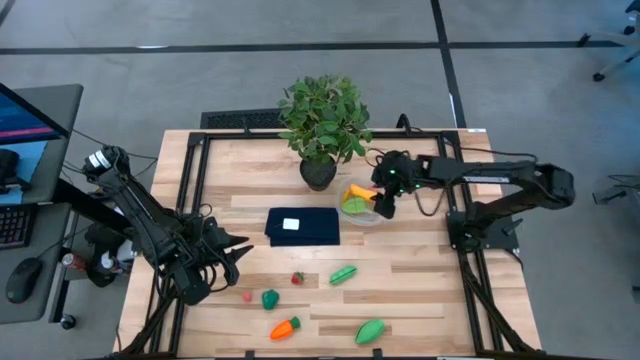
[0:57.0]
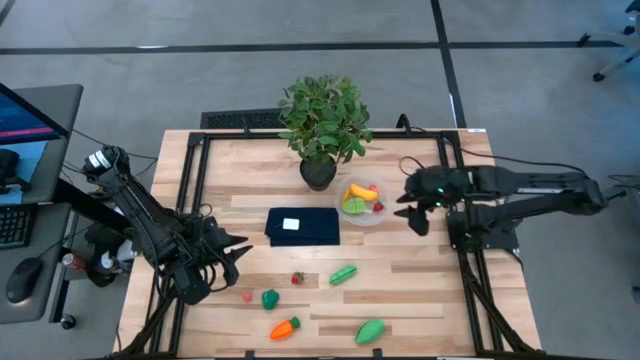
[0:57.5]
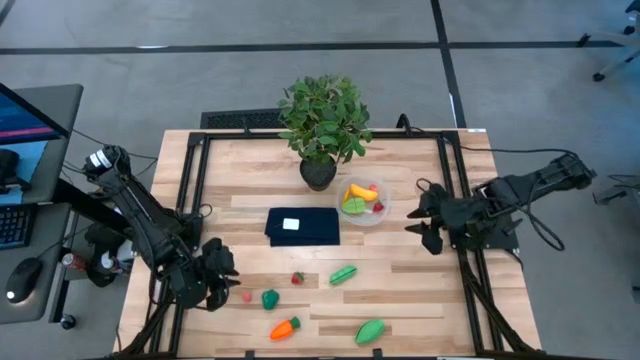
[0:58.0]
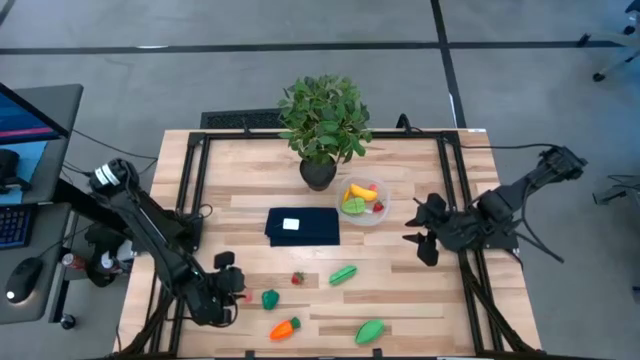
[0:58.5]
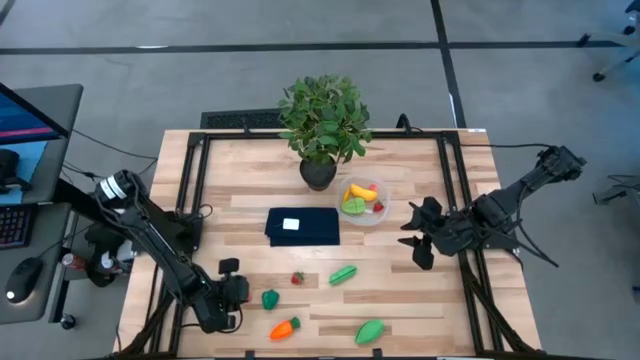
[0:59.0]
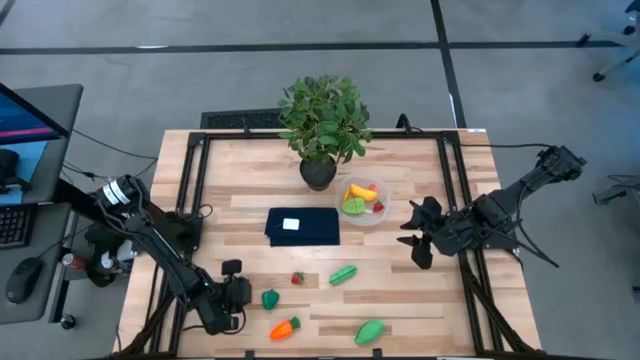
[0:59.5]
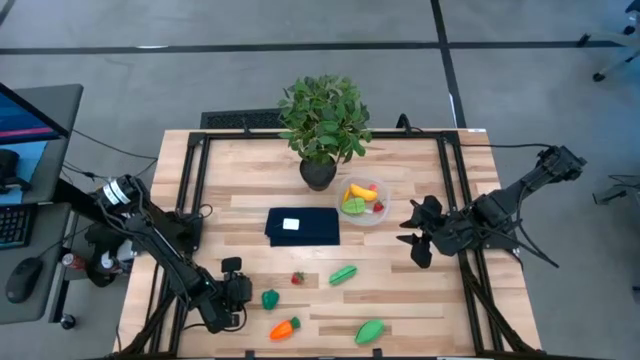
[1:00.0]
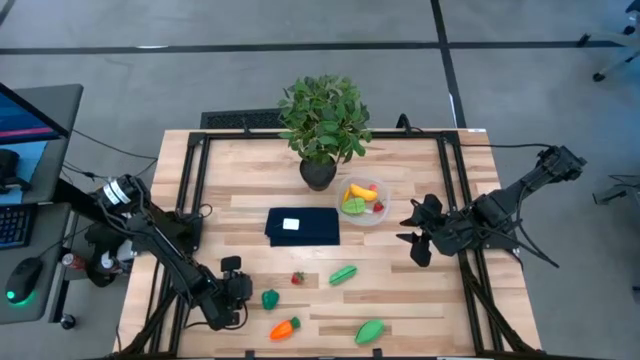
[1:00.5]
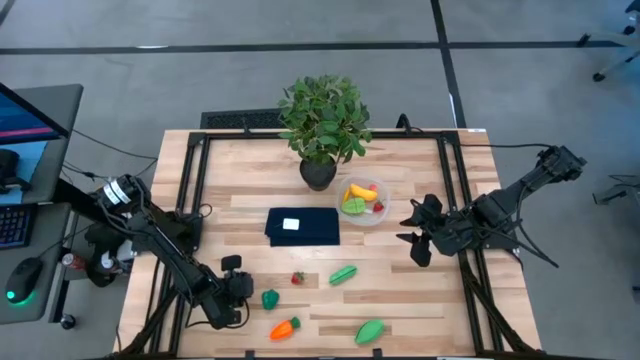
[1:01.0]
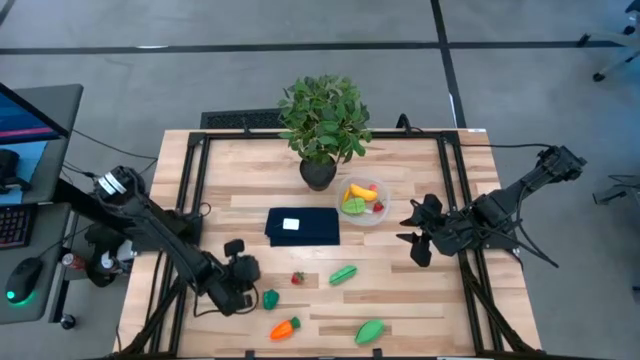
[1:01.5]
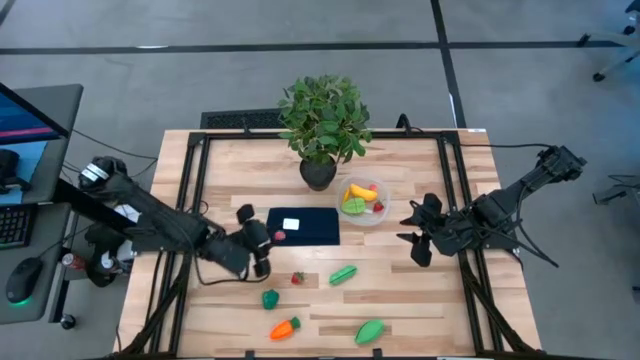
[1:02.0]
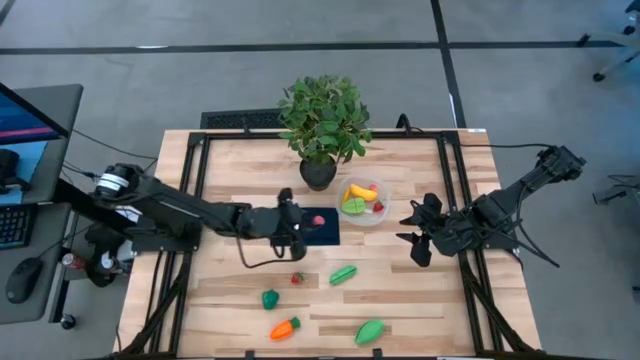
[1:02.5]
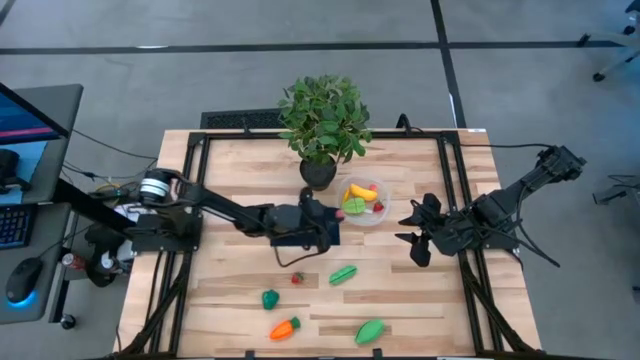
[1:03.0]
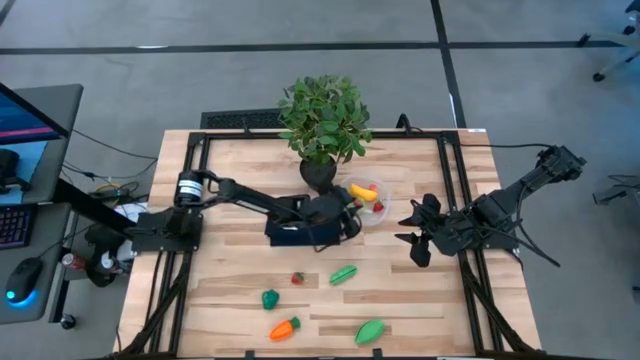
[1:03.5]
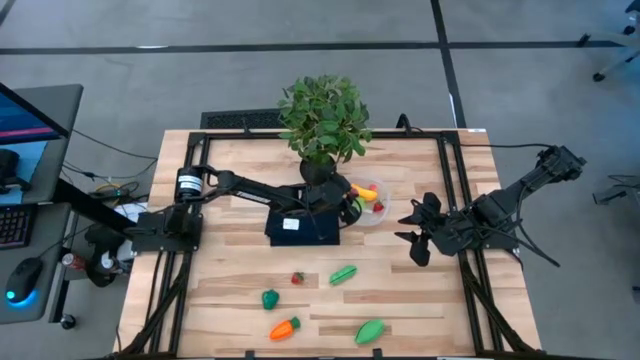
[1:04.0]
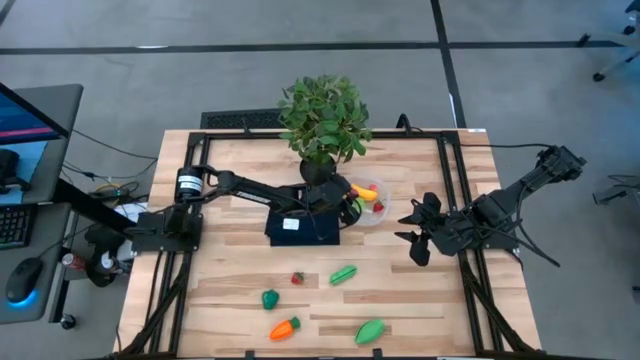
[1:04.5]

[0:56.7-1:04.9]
Task: Pick and placing Produce into tupperware
Put the pink peach into the transparent container

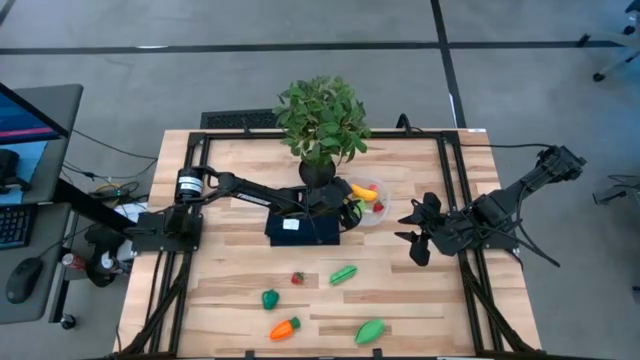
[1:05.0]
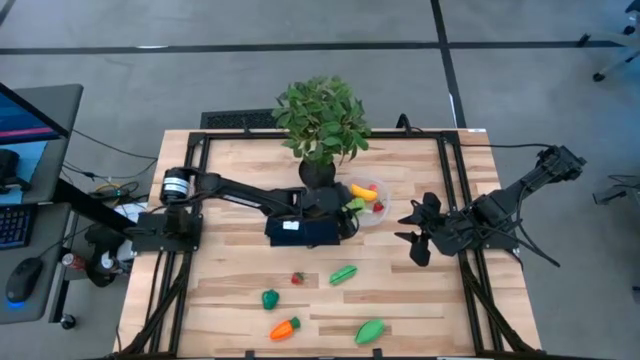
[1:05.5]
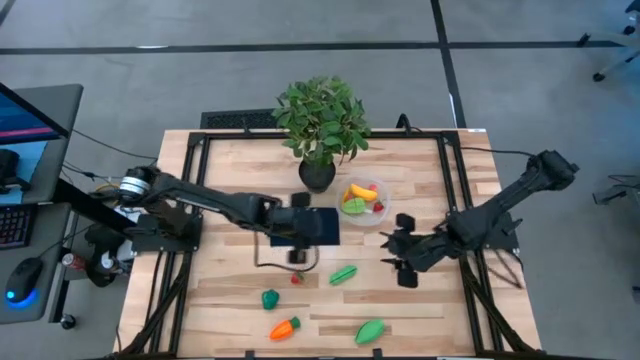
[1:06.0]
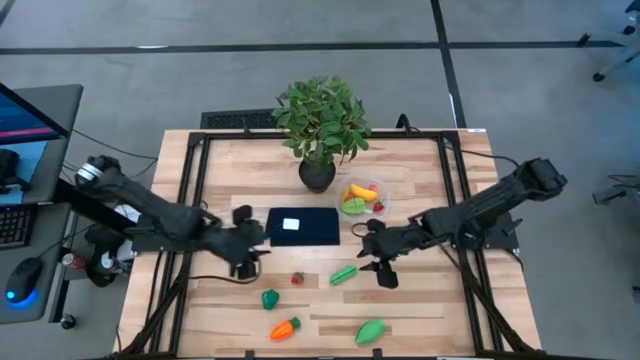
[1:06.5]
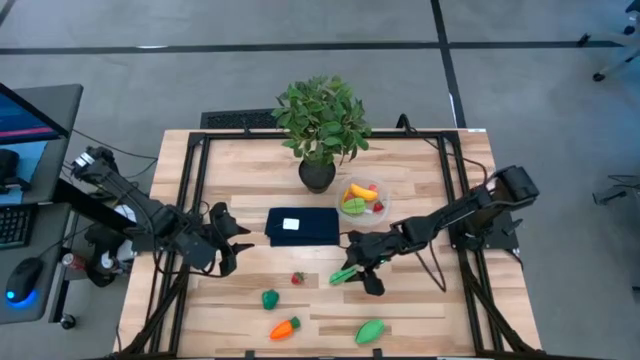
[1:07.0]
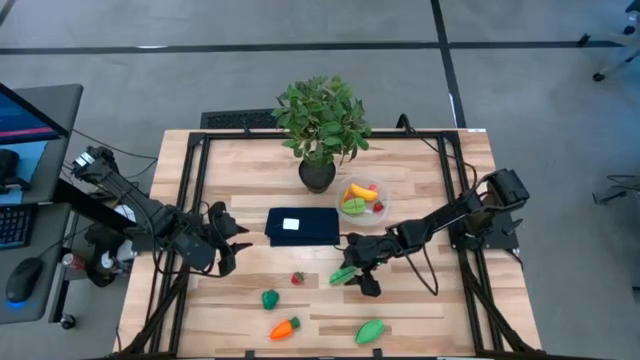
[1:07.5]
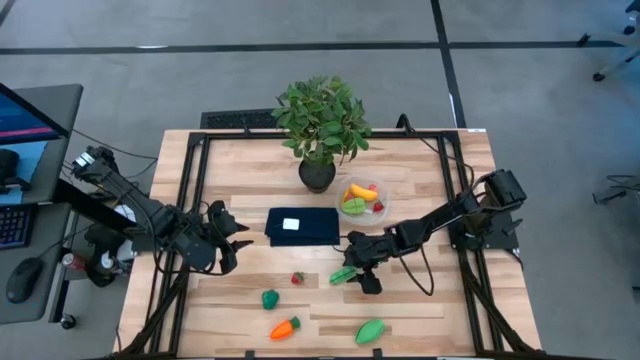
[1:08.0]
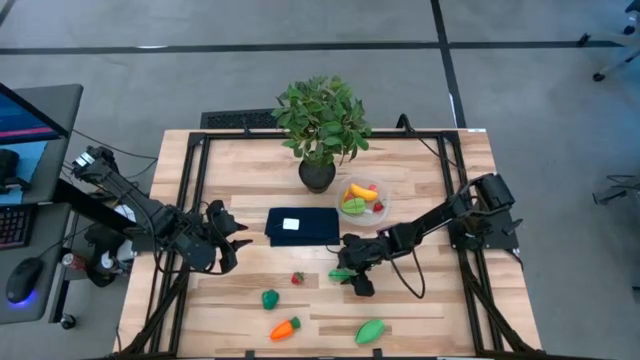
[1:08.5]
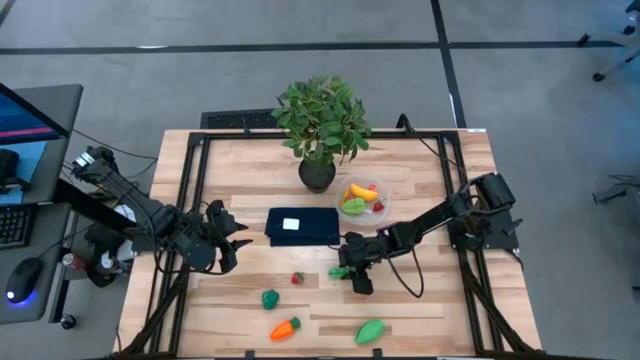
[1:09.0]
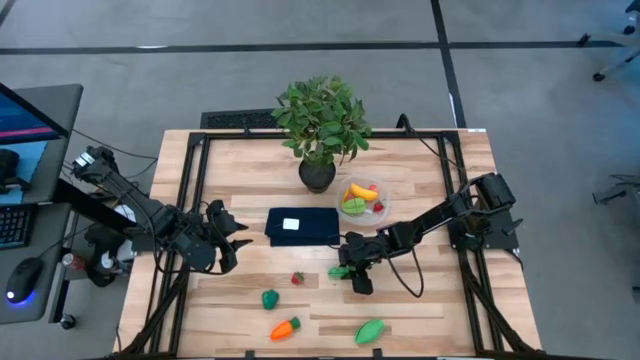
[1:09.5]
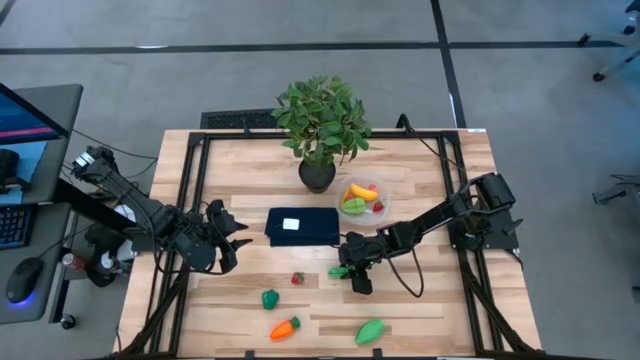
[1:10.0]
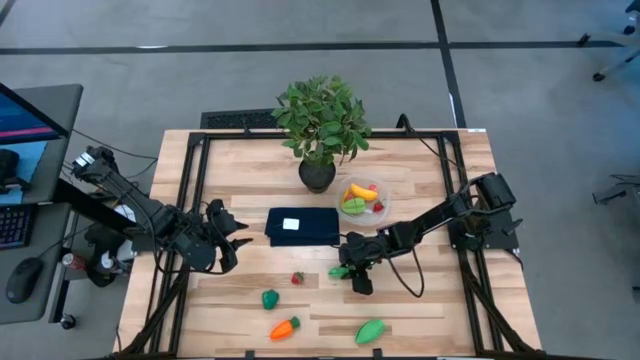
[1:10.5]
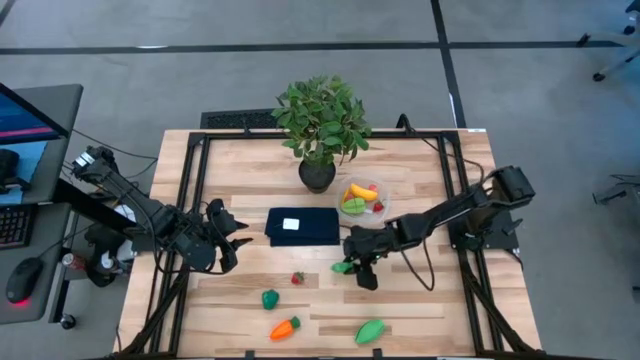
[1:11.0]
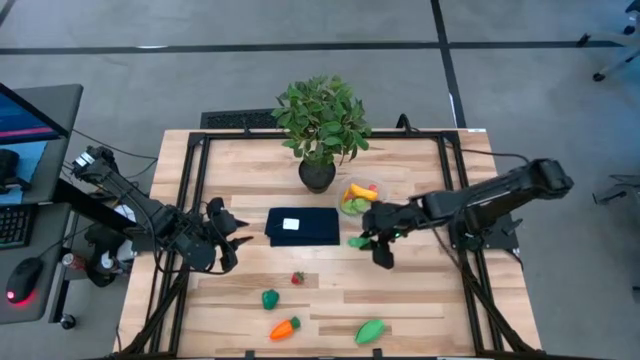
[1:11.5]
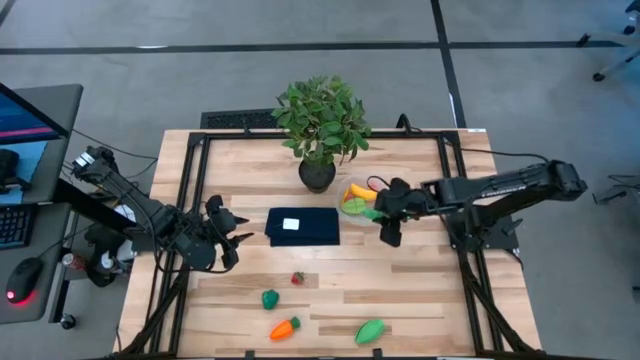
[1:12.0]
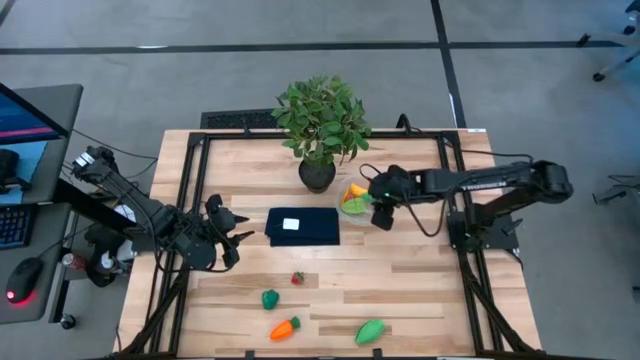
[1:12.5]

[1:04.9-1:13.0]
Put the green pea into the transparent container

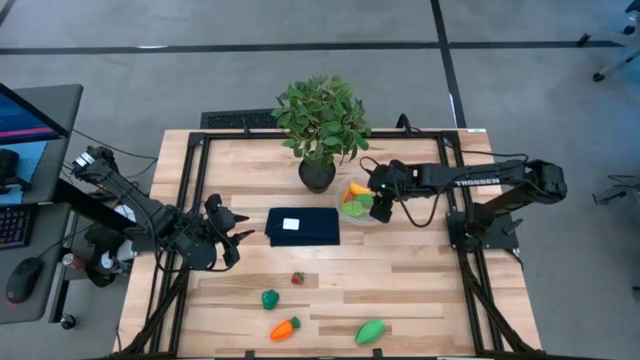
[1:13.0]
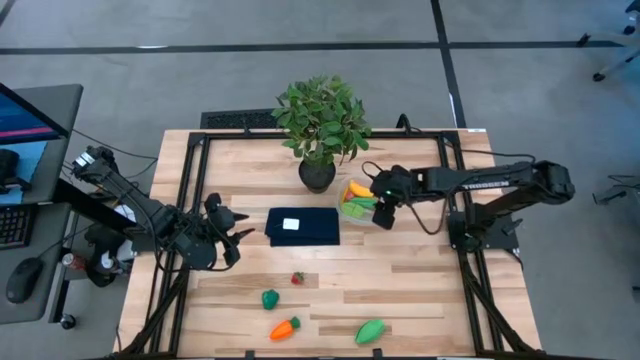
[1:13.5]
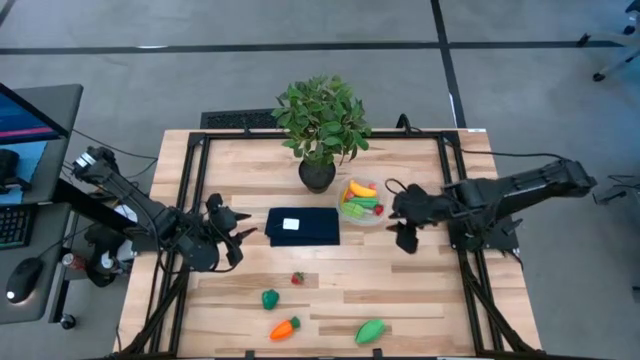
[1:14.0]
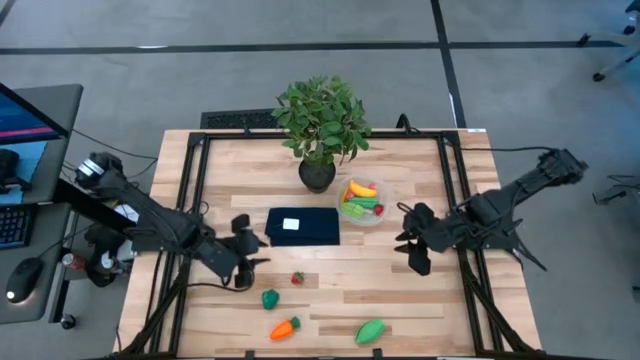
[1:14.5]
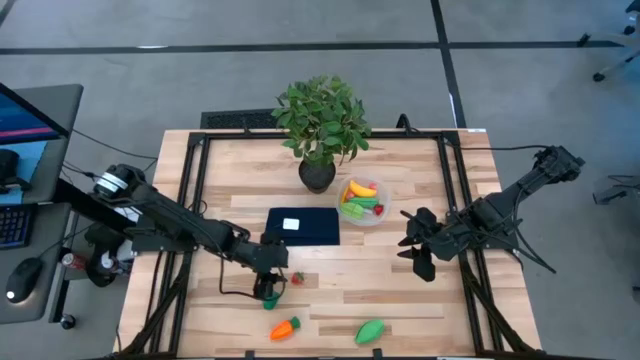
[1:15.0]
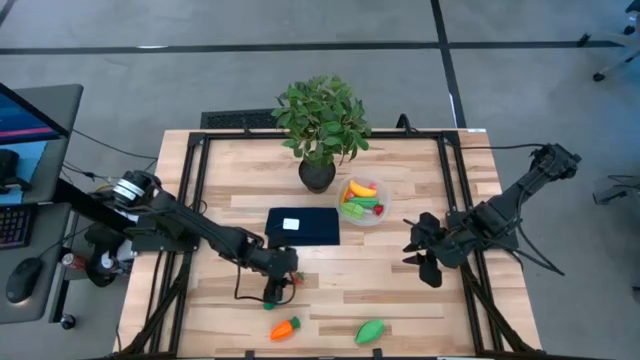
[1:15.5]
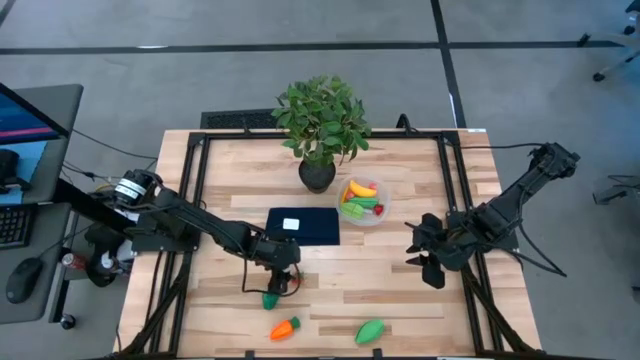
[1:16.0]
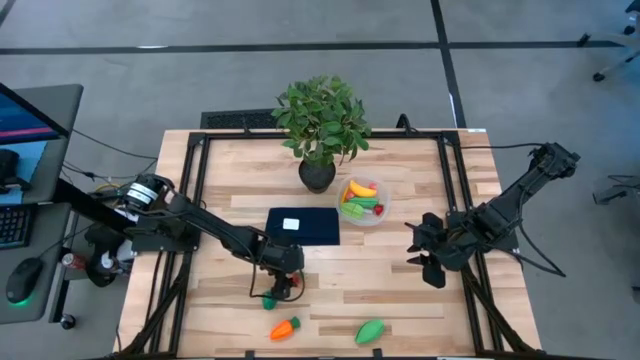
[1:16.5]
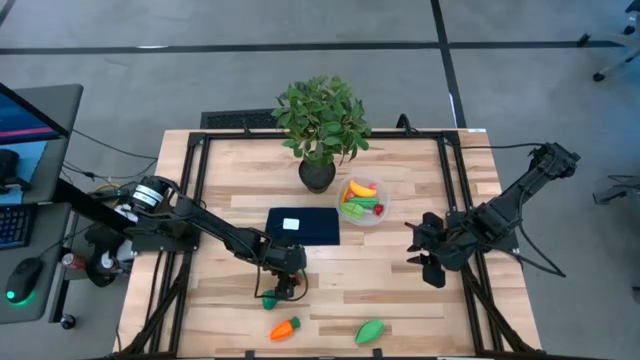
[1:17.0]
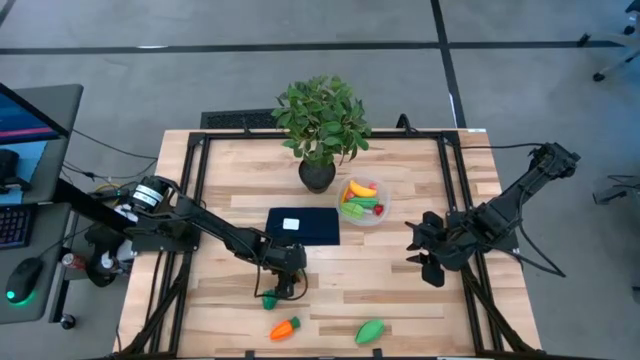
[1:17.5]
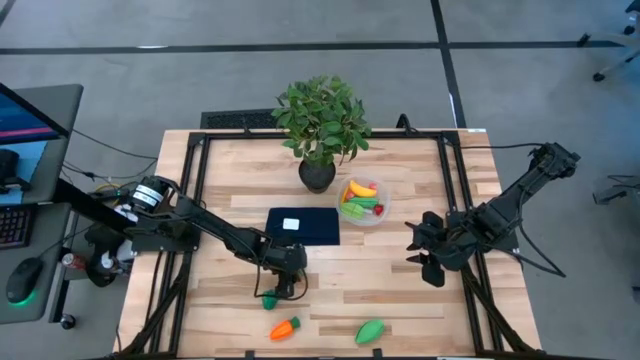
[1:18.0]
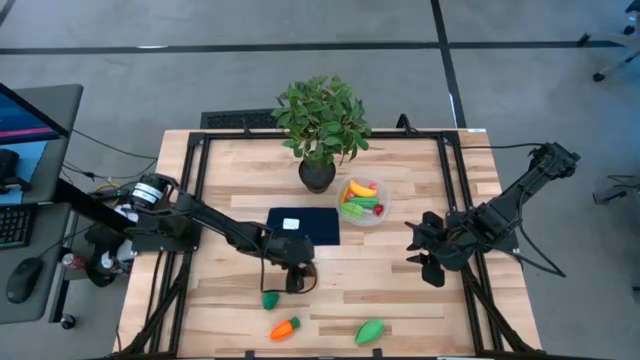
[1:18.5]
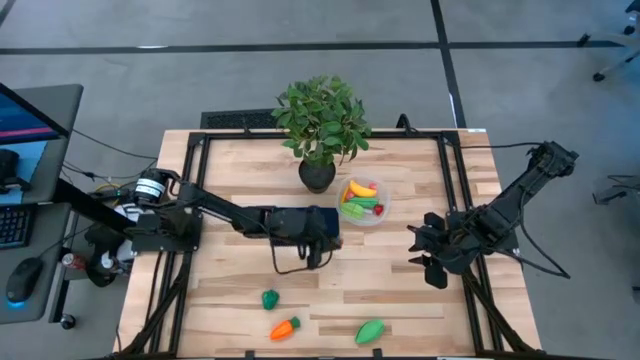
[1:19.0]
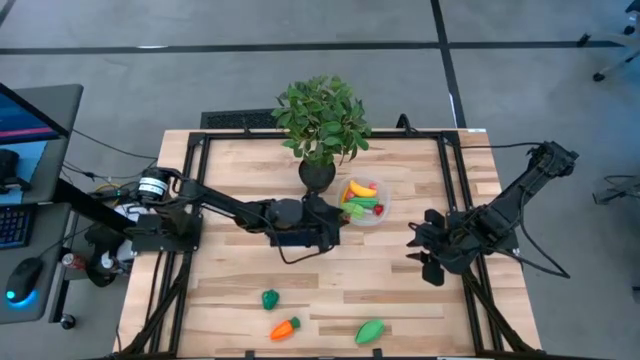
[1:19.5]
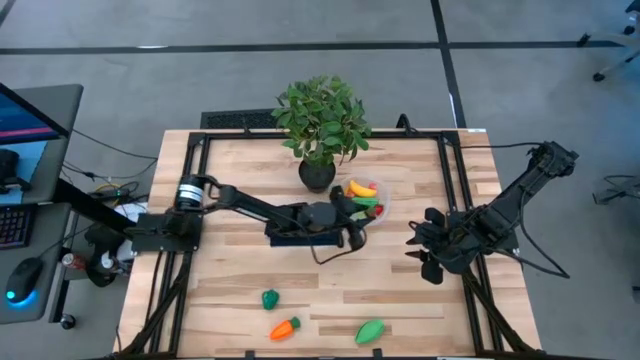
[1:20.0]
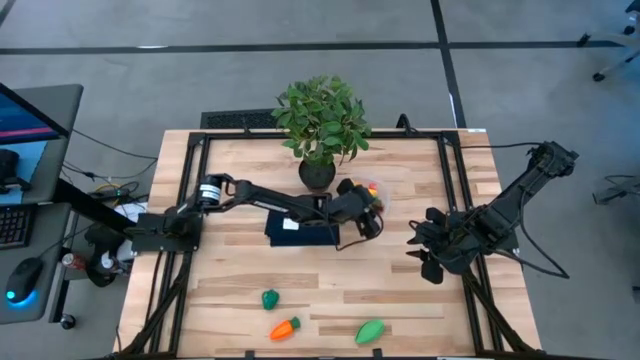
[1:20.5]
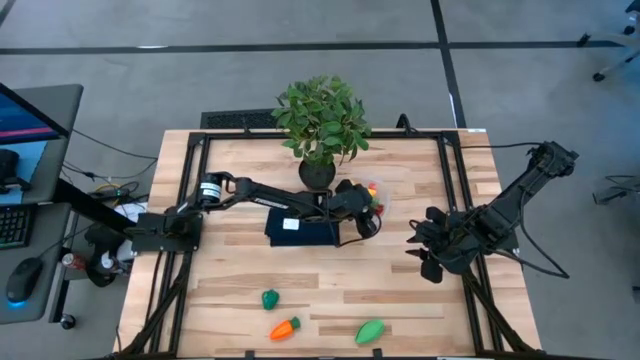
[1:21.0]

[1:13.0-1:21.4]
Put the red strawberry into the transparent container
